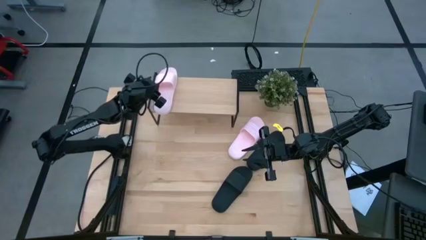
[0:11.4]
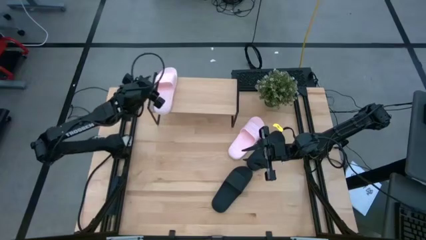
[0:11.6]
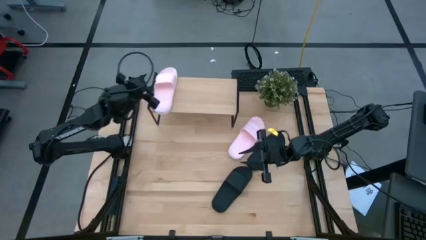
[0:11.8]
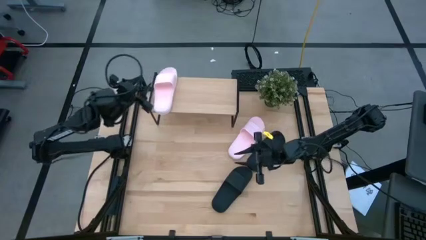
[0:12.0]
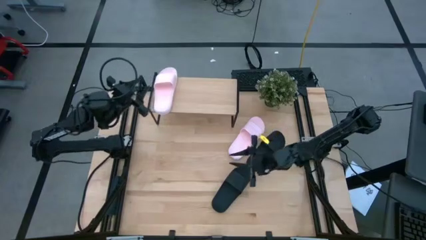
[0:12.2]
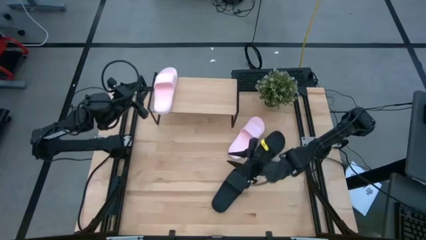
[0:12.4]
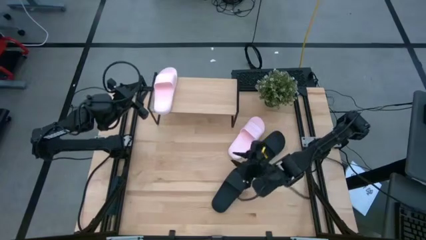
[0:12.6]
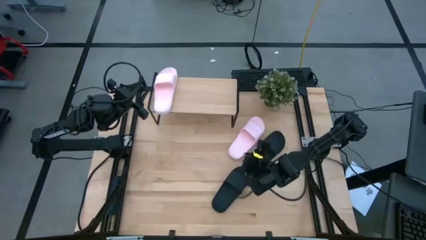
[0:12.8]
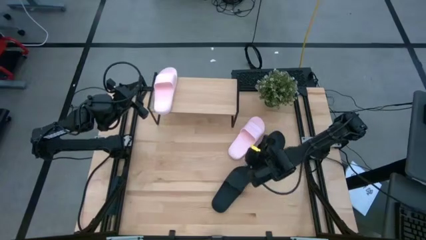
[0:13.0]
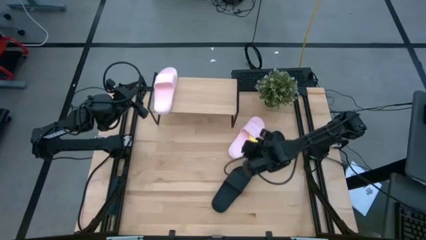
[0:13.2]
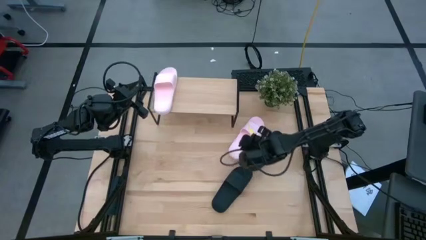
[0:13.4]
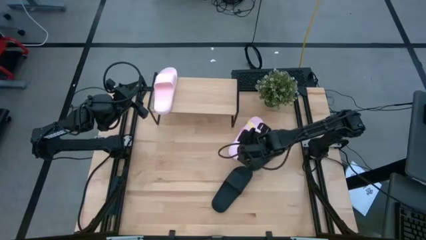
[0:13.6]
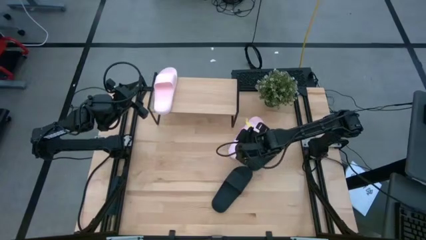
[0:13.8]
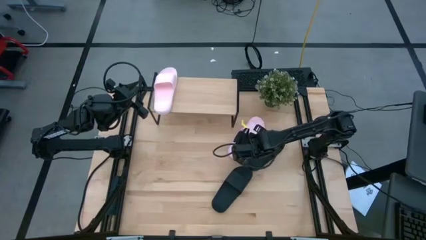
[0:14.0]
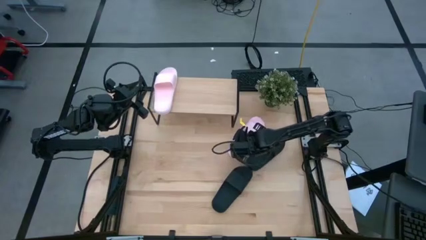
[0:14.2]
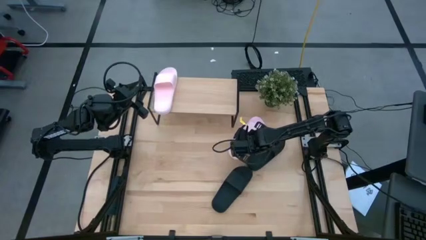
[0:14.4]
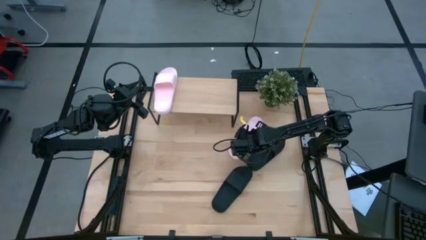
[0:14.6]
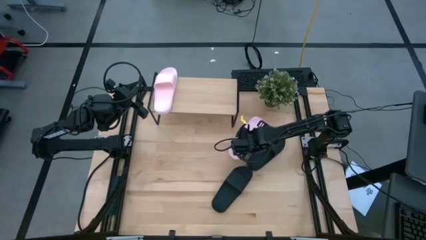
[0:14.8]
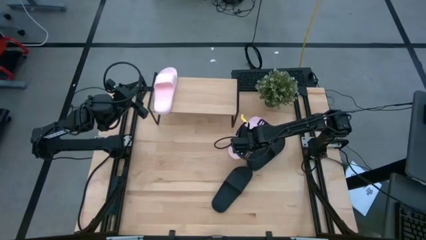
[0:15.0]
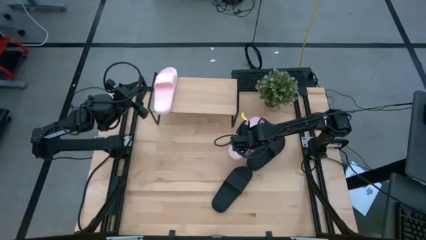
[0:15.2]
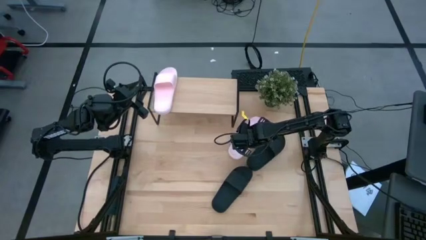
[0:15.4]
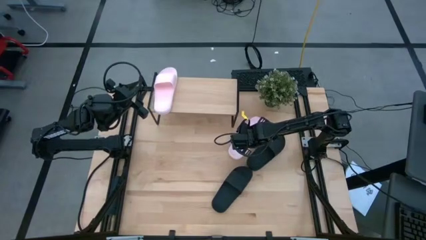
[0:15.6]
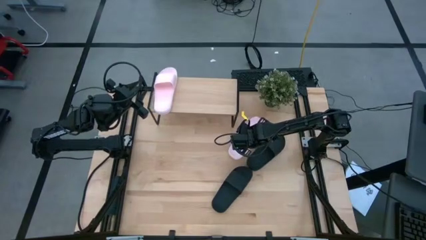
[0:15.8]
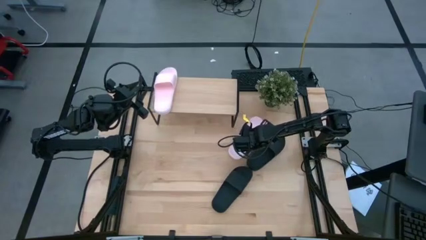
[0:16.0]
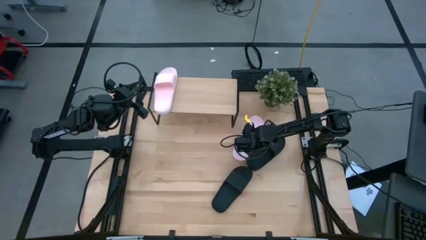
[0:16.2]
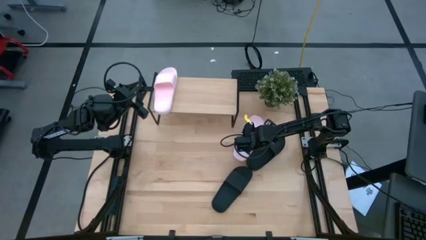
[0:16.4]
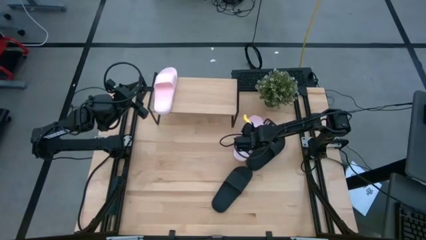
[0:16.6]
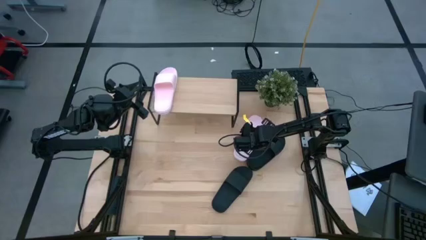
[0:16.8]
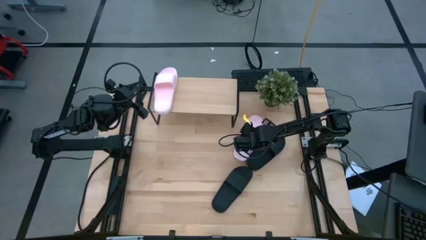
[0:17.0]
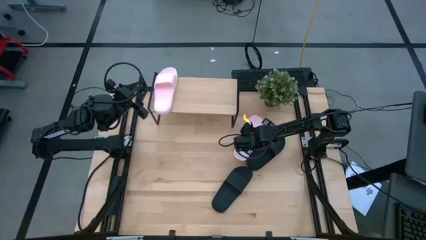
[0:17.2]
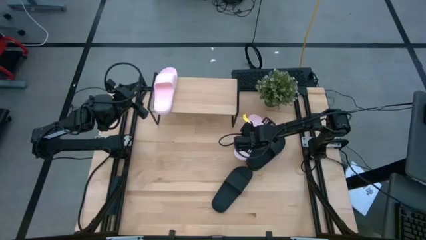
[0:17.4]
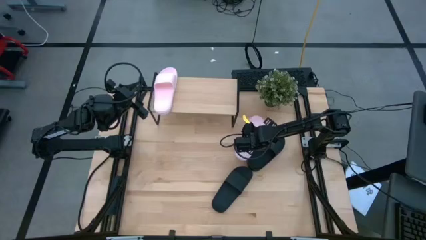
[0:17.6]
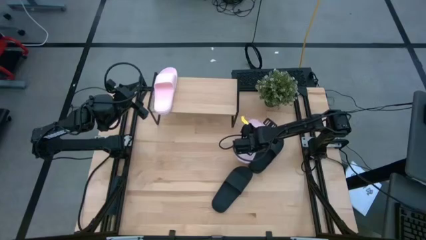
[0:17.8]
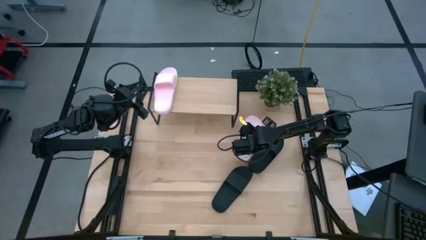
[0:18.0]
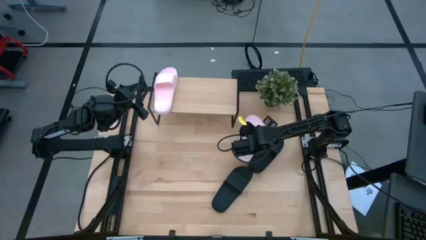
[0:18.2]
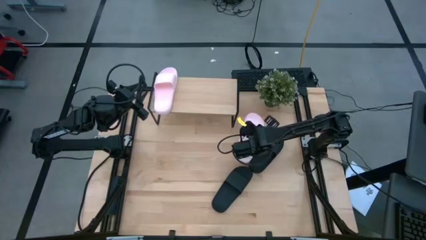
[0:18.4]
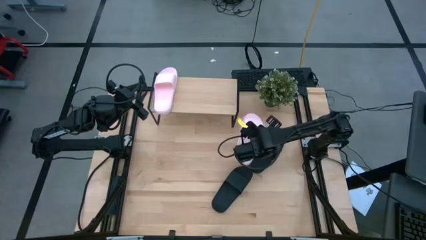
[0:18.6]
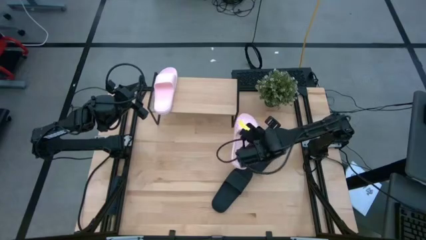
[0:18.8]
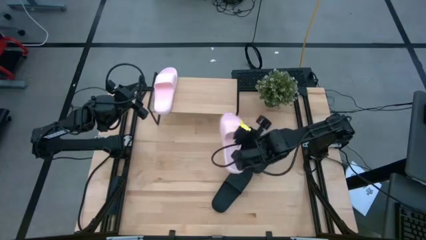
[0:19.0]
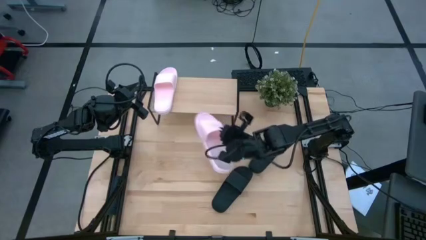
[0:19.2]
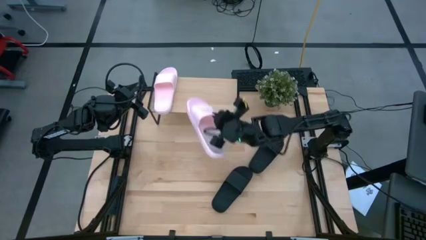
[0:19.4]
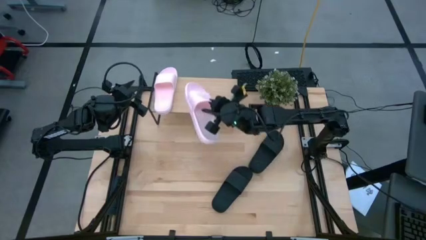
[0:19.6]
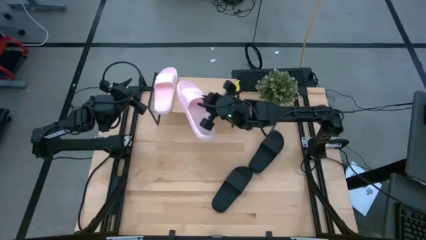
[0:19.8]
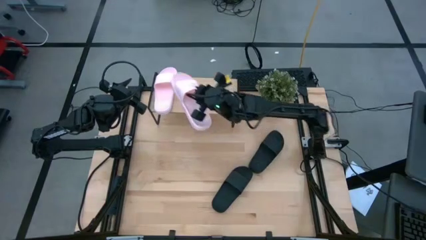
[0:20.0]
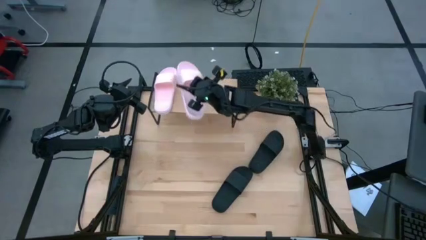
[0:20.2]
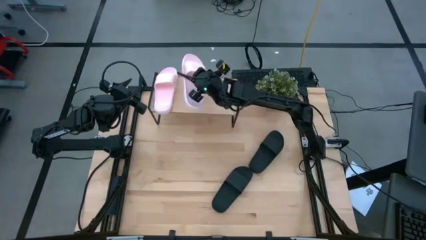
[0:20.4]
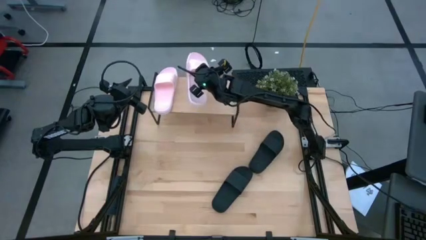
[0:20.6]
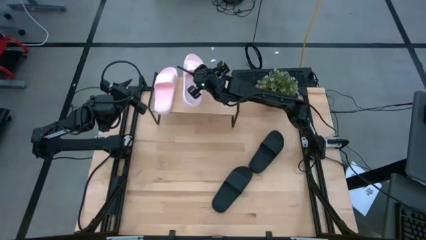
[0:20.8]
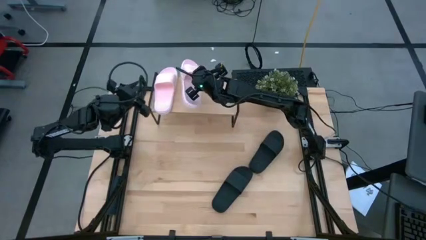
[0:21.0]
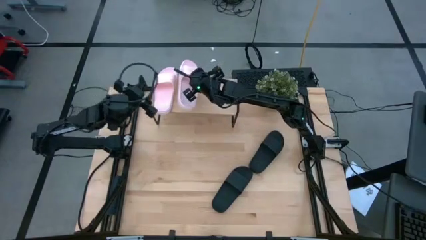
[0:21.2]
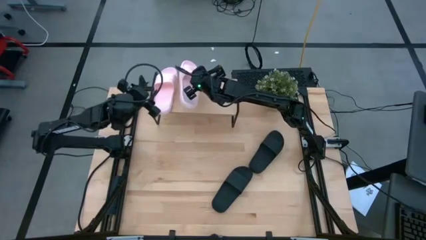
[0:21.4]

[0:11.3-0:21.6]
Task: Pick and place slides into the shelf
Put the pink slipper on the shelf
